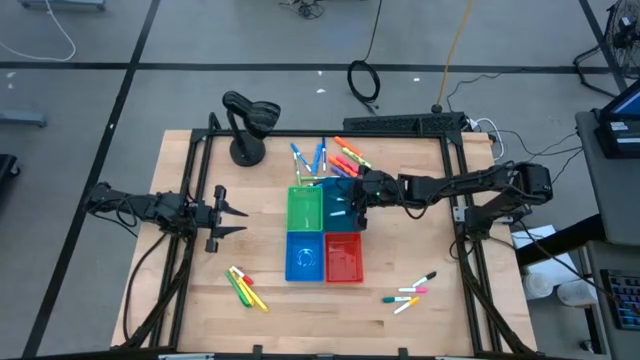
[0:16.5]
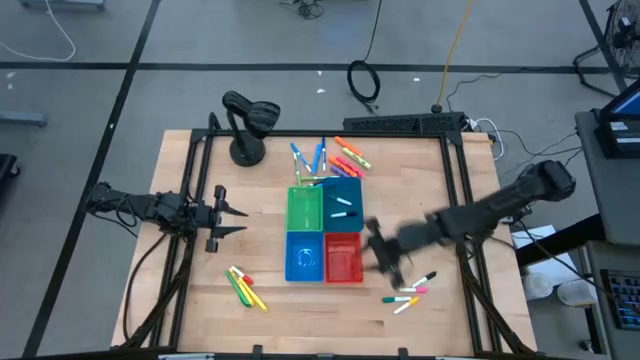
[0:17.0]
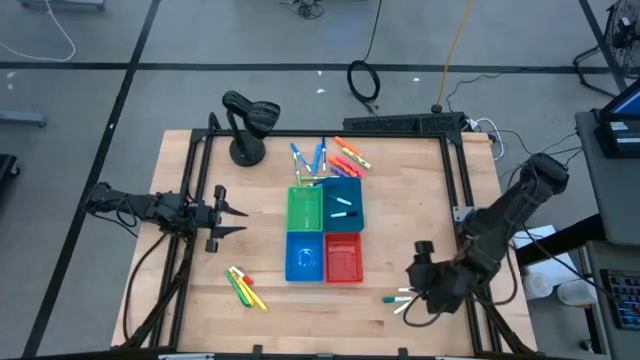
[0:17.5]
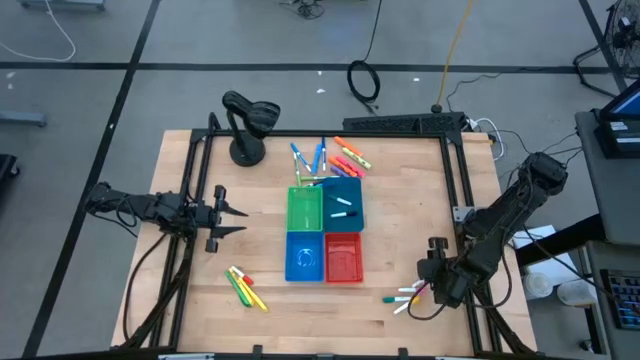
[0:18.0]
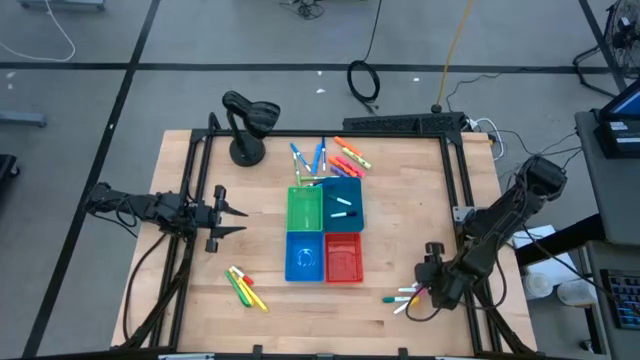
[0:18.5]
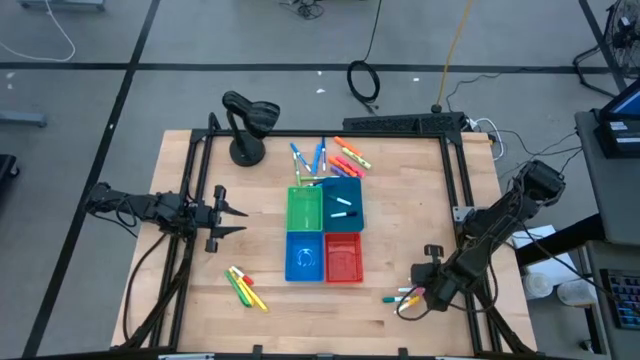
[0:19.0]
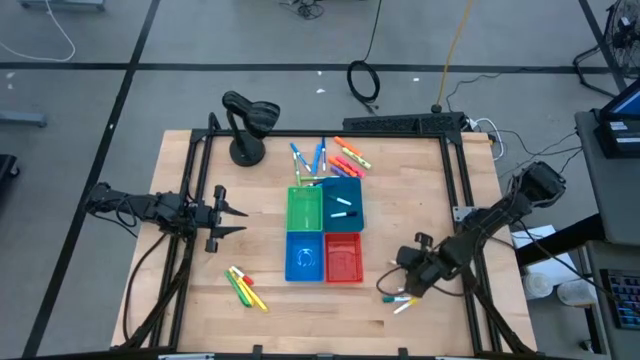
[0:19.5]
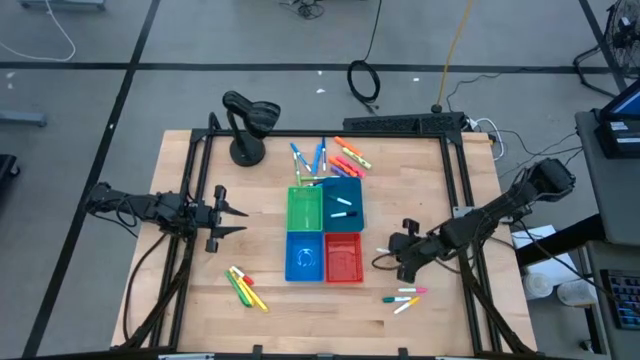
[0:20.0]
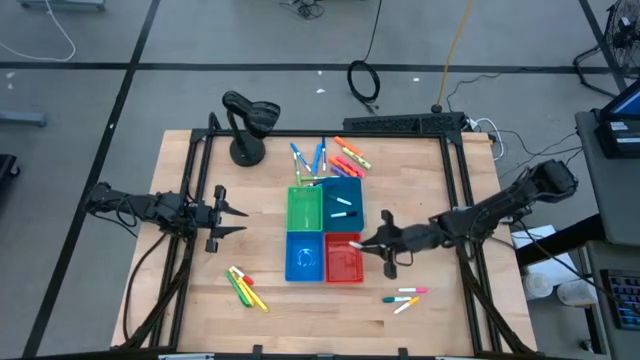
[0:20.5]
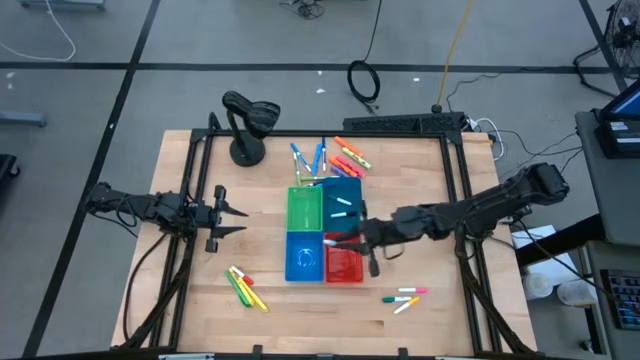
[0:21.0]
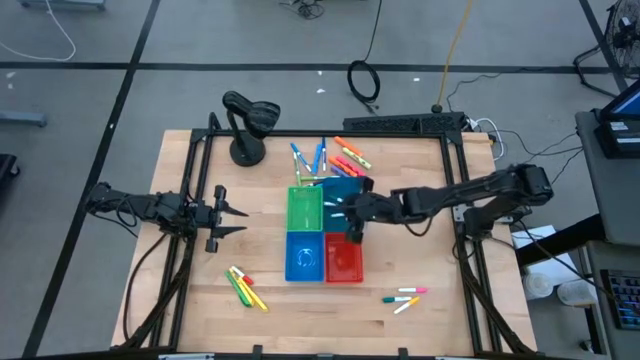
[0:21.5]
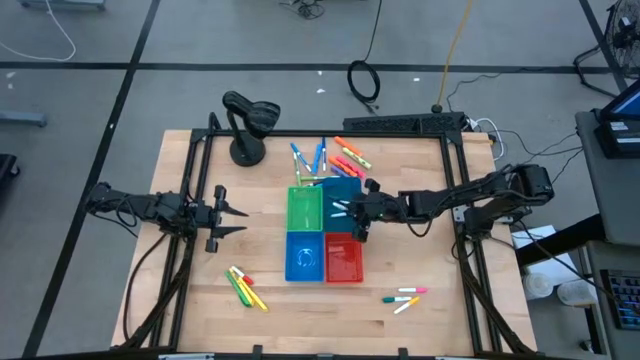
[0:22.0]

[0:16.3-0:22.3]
Task: Pick & Place Markers
Put the black highlighter pen into the blue bin

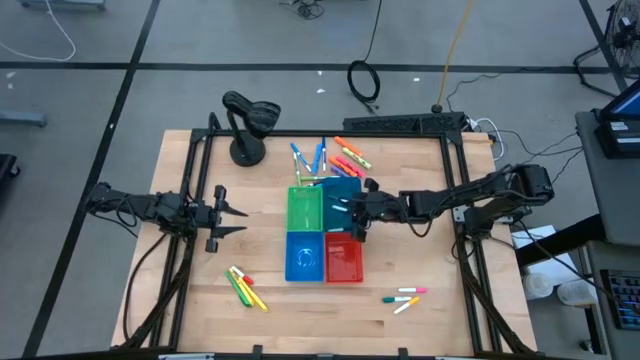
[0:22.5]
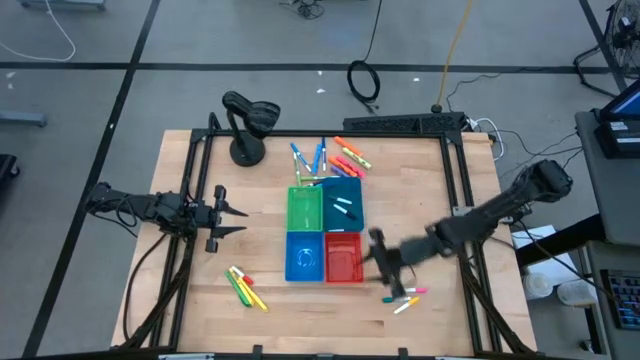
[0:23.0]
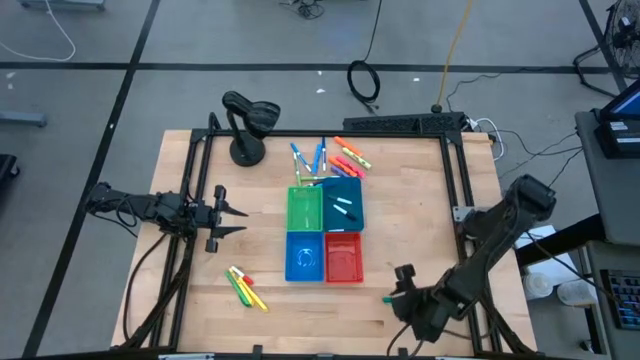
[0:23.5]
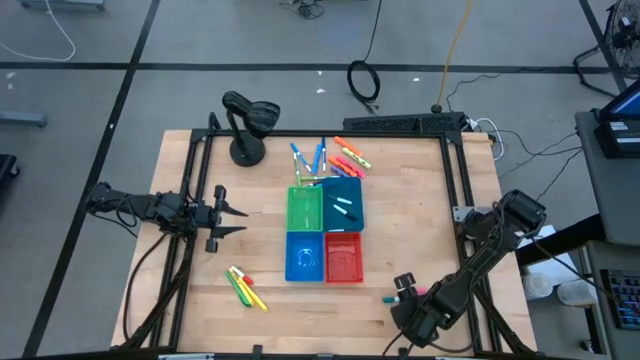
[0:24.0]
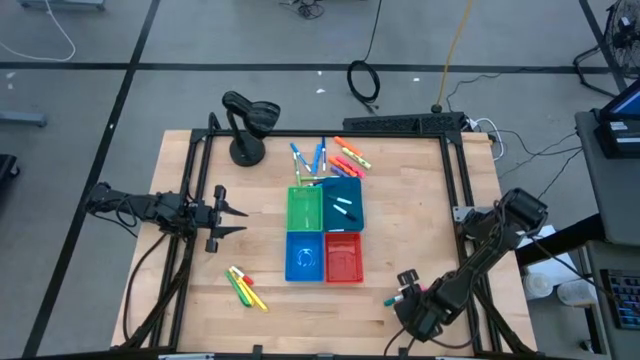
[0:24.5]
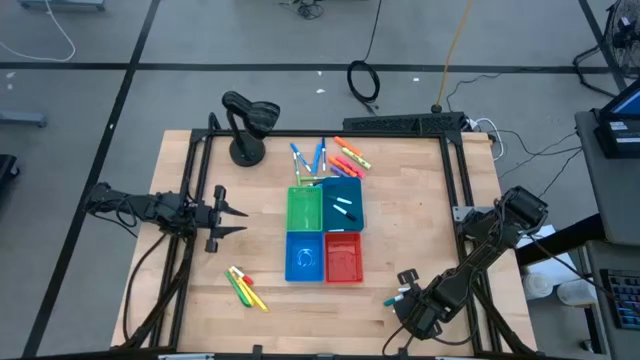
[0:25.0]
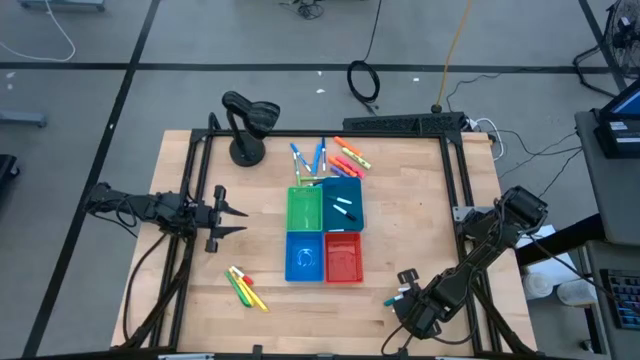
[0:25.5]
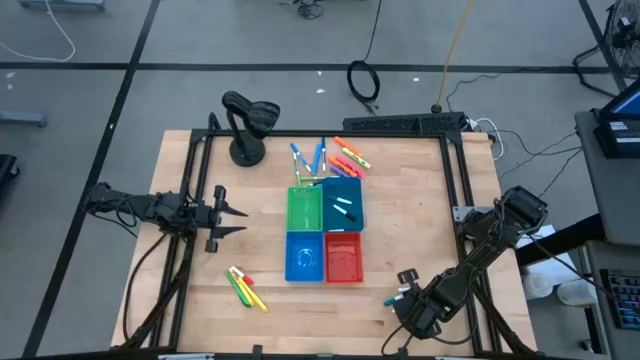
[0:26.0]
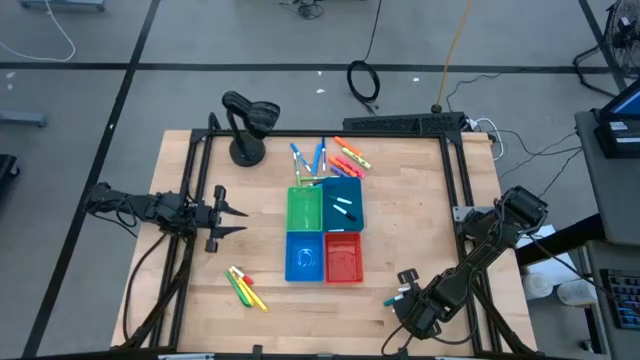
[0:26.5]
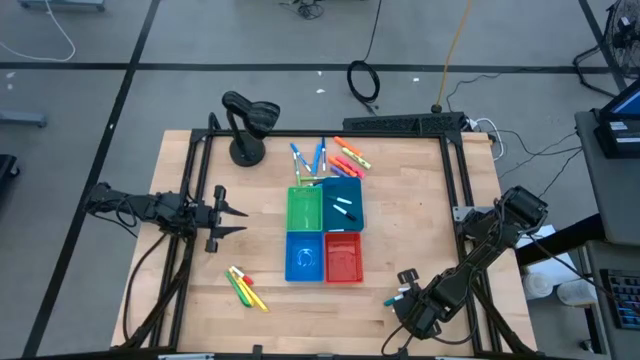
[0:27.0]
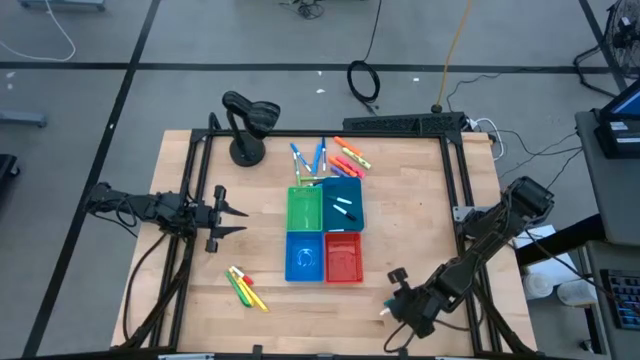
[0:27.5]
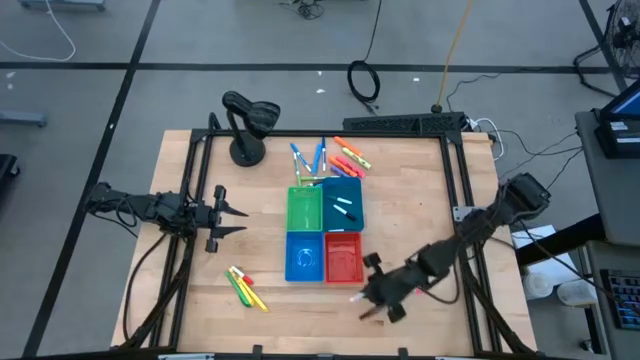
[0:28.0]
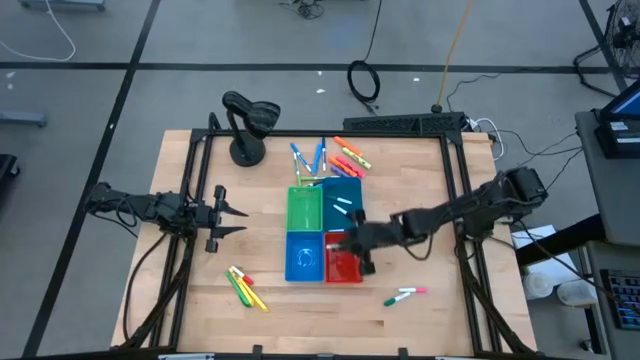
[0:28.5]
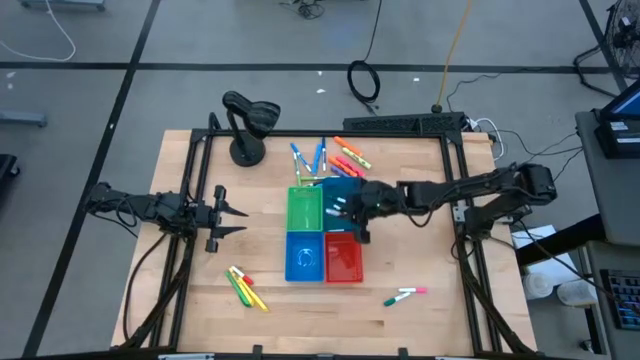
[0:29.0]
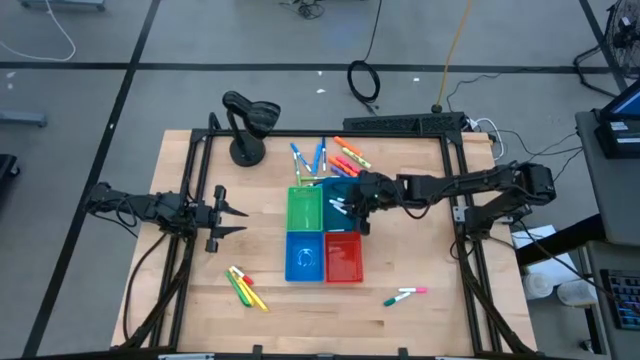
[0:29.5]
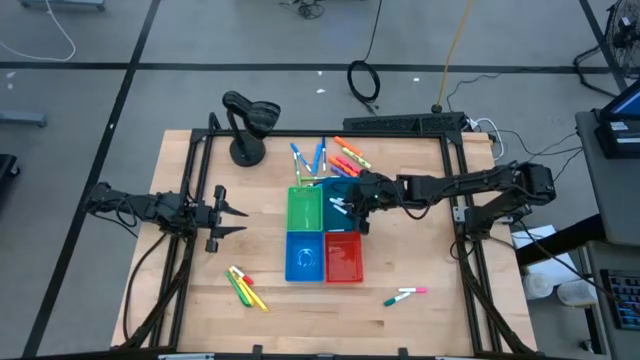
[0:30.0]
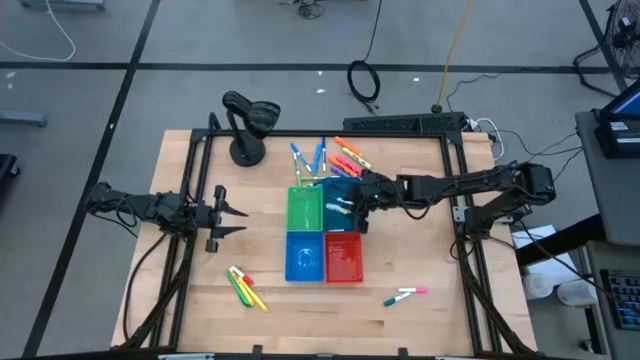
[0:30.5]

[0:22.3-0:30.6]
Put the yellow highlighter pen into the blue bin

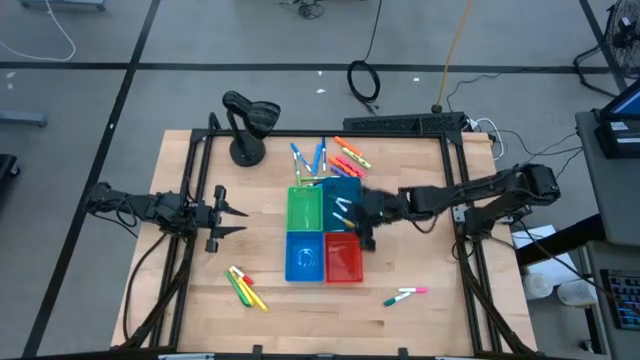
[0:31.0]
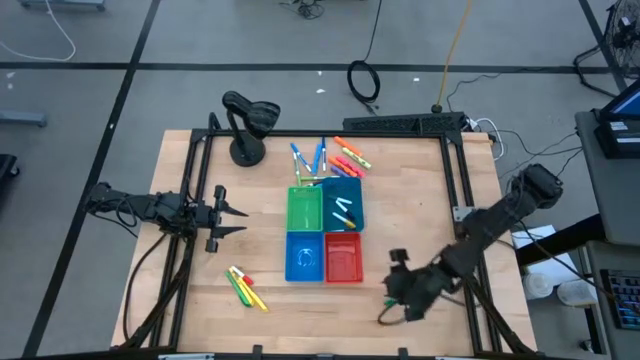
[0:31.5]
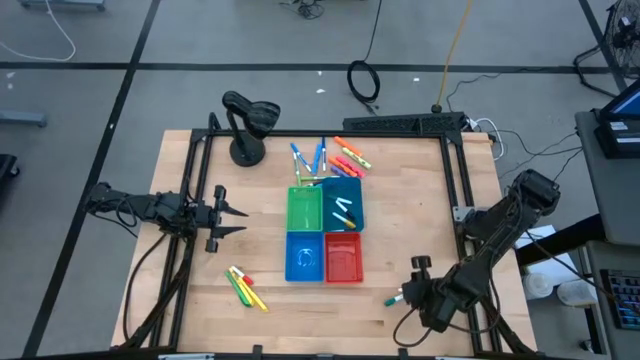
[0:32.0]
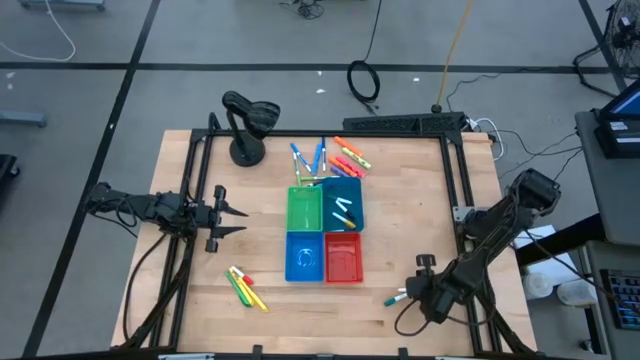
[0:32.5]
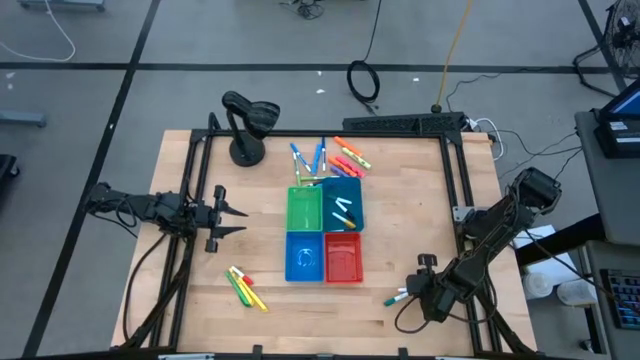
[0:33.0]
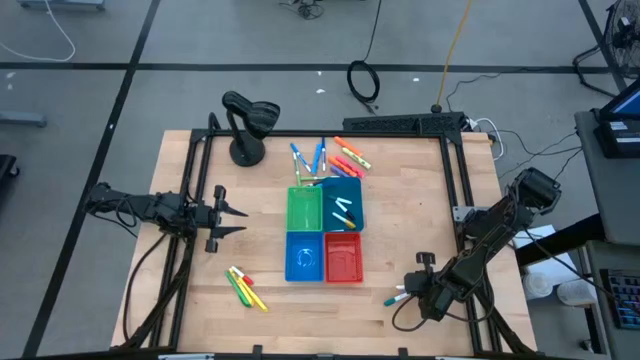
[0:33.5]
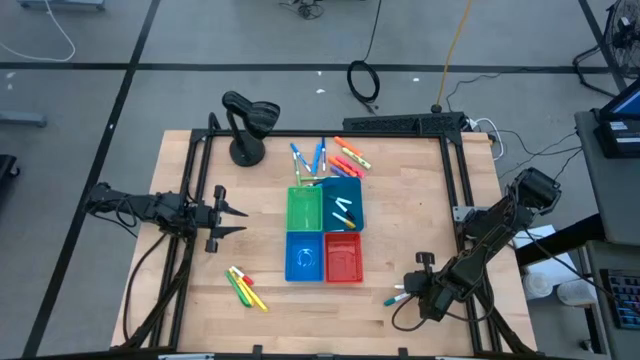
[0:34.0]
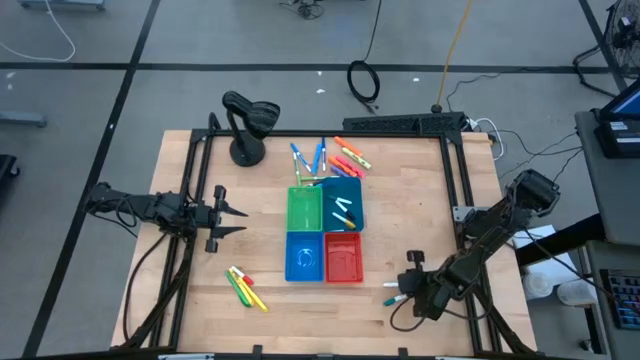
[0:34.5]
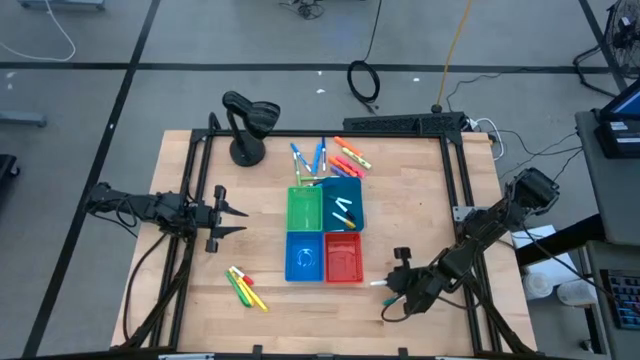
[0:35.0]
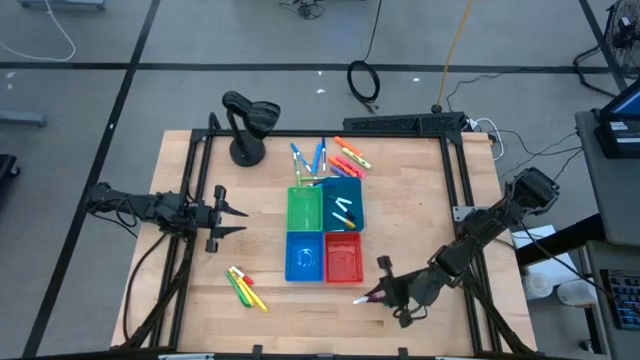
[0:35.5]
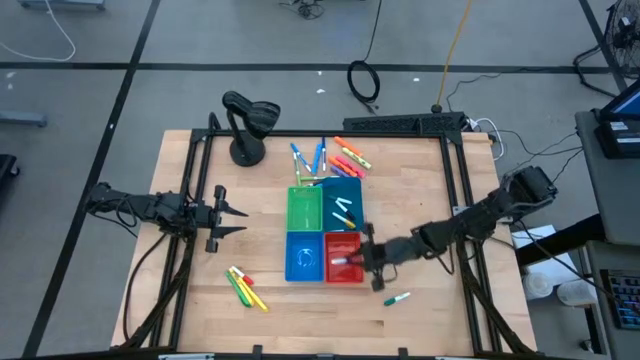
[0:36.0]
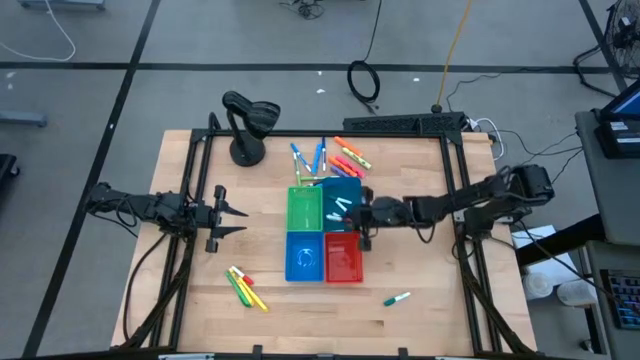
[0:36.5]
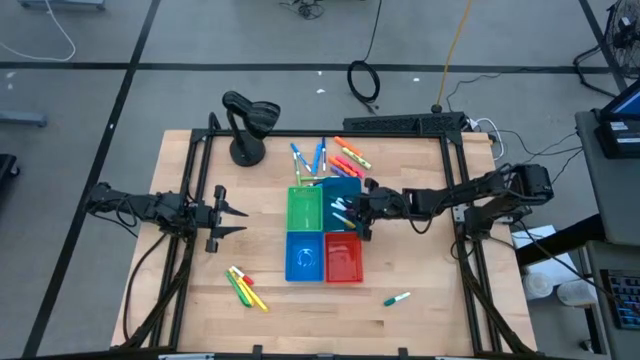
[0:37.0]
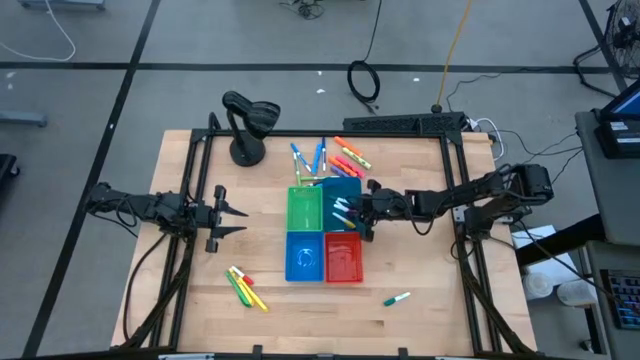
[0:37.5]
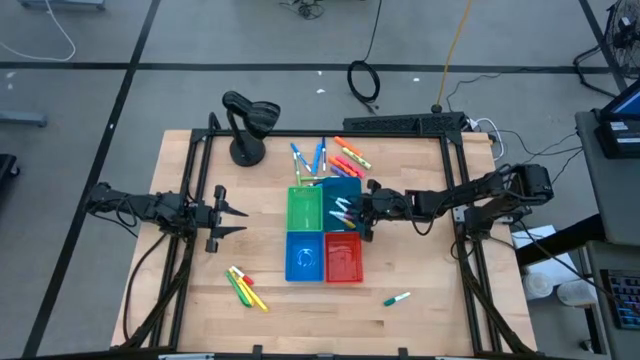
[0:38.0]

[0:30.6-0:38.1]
Put the pink highlighter pen into the blue bin
